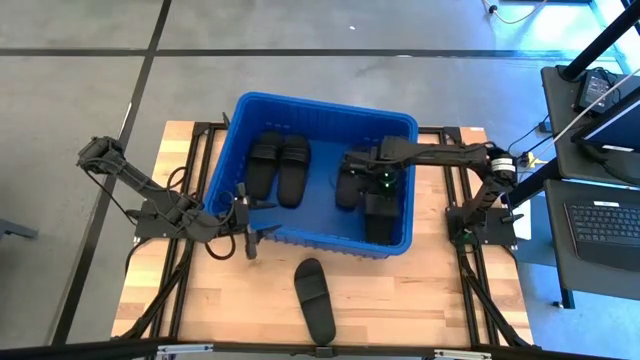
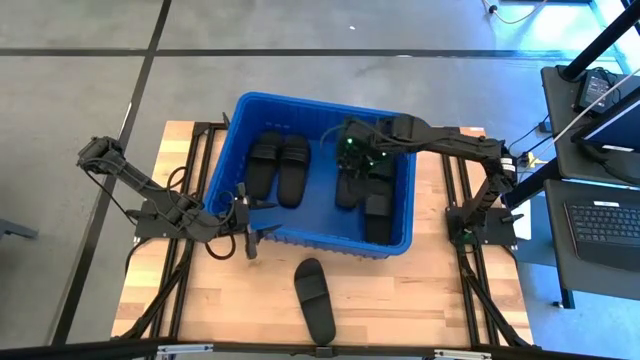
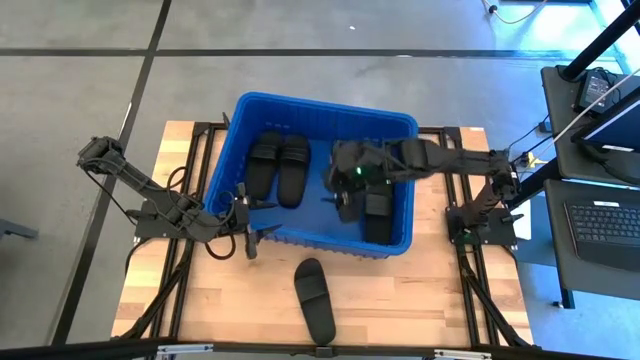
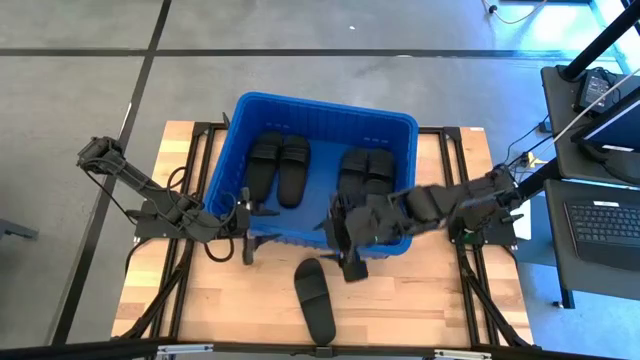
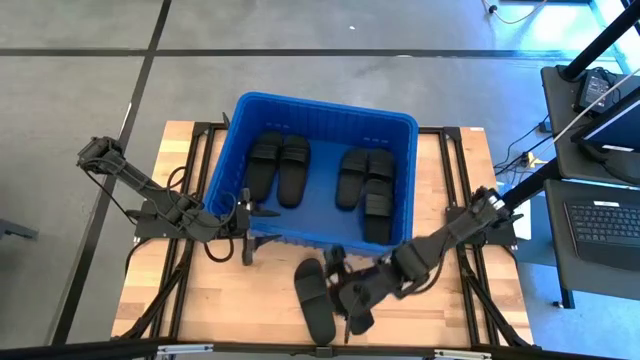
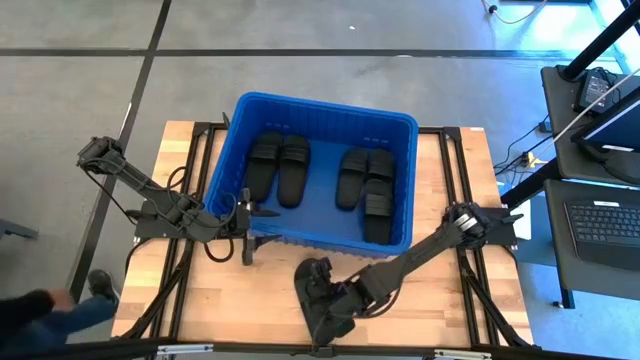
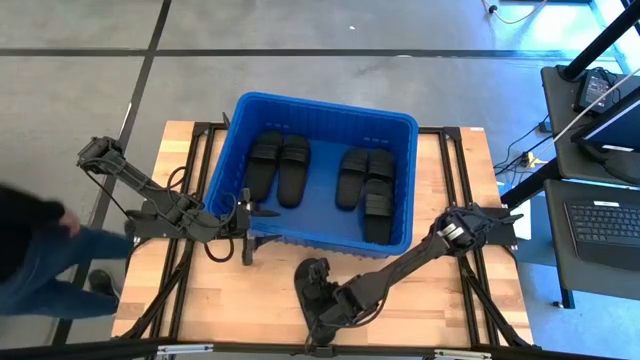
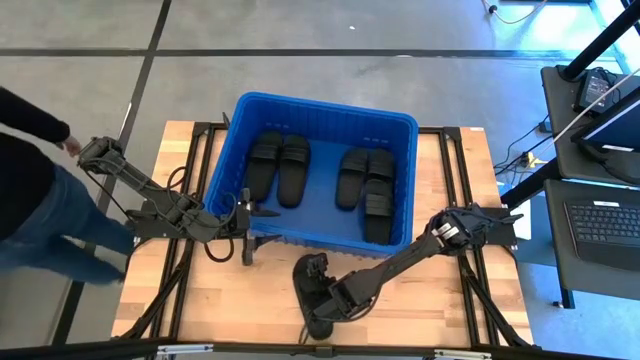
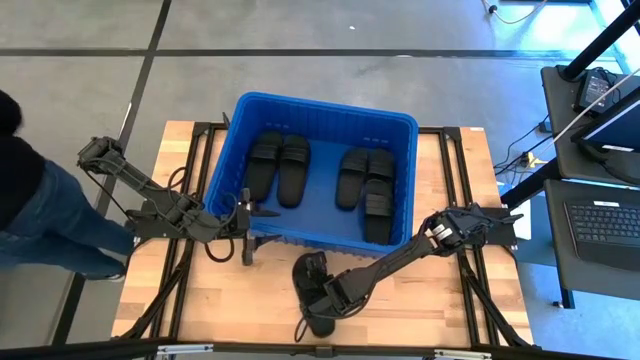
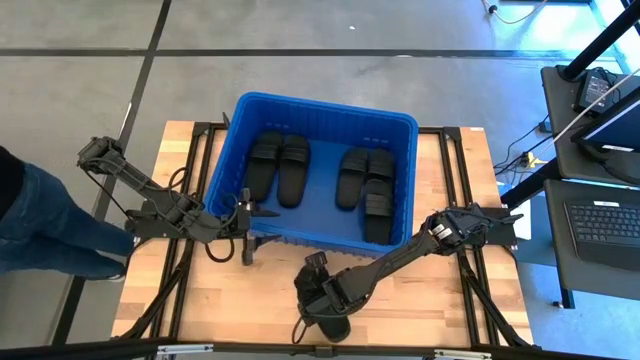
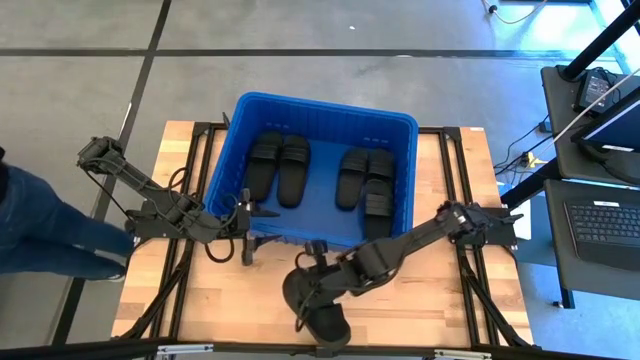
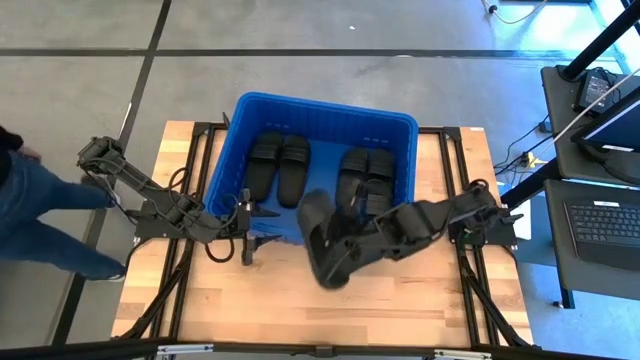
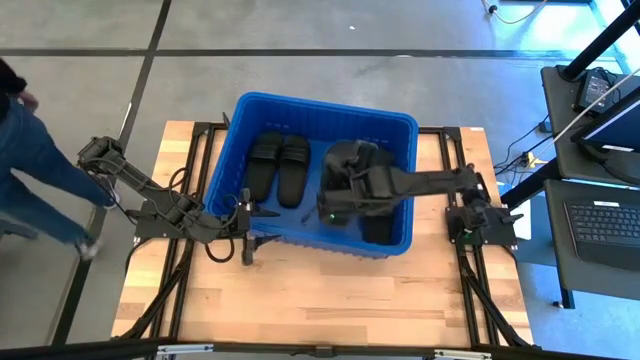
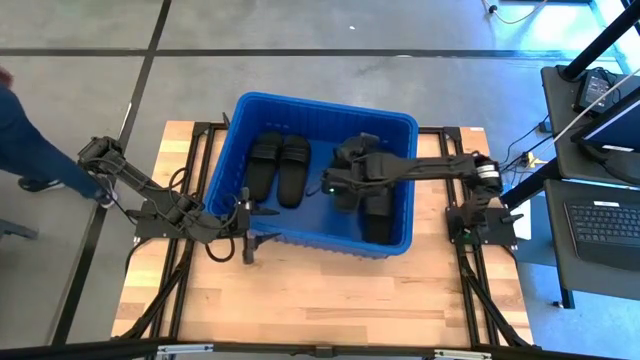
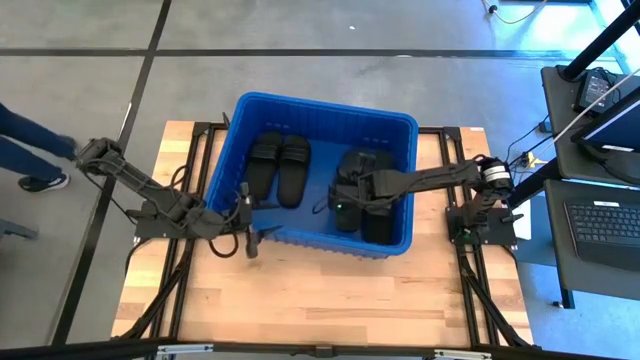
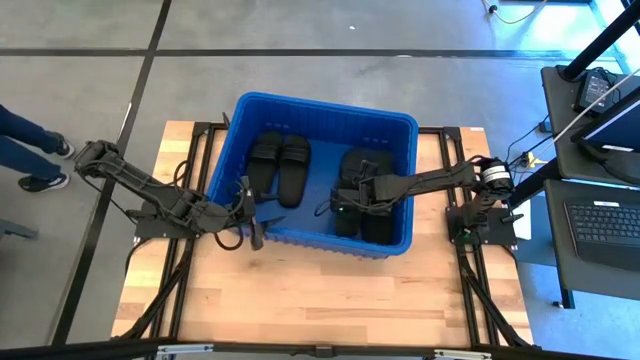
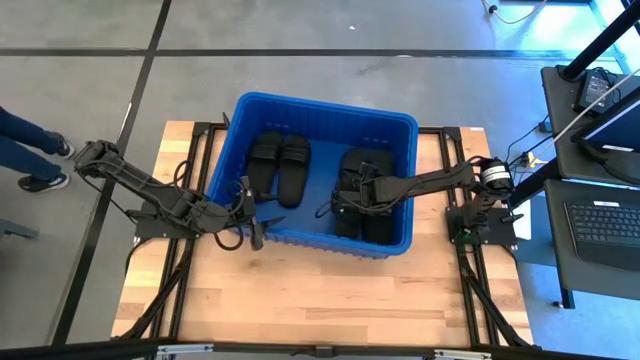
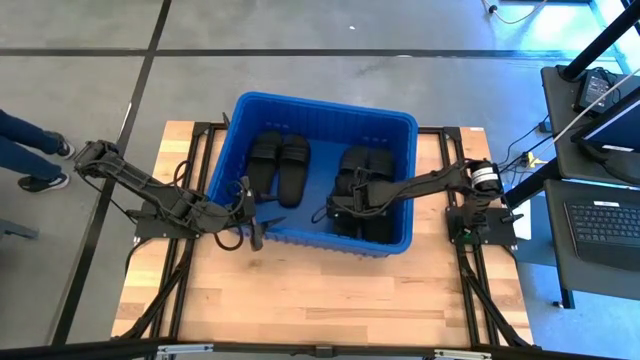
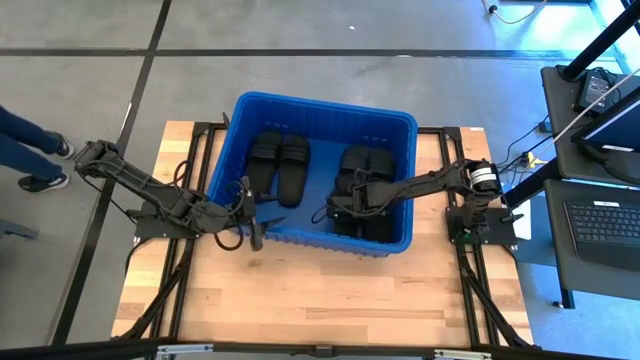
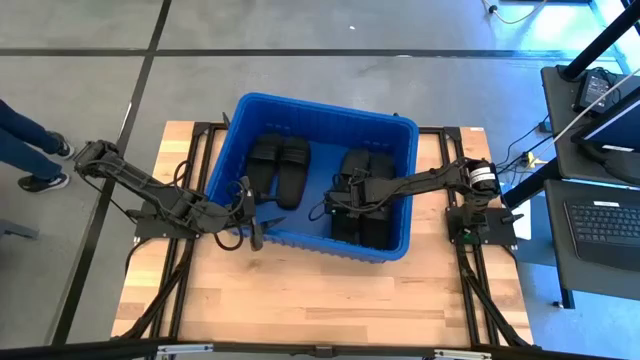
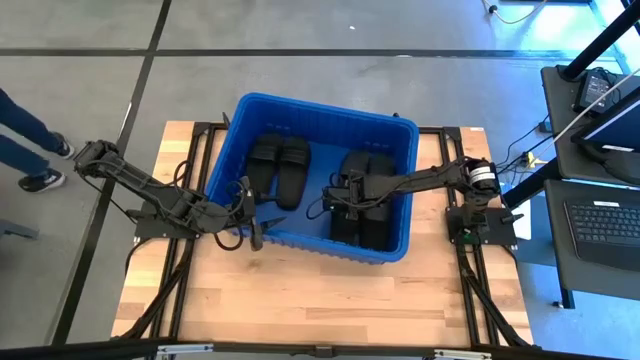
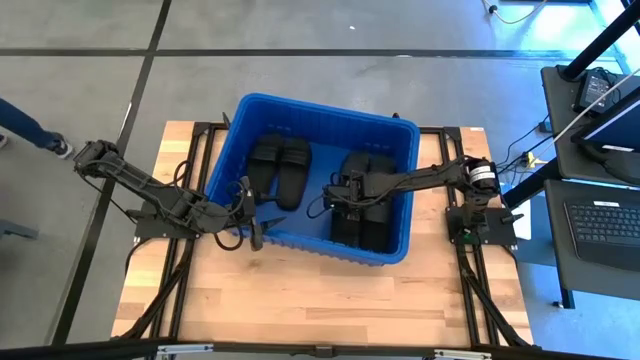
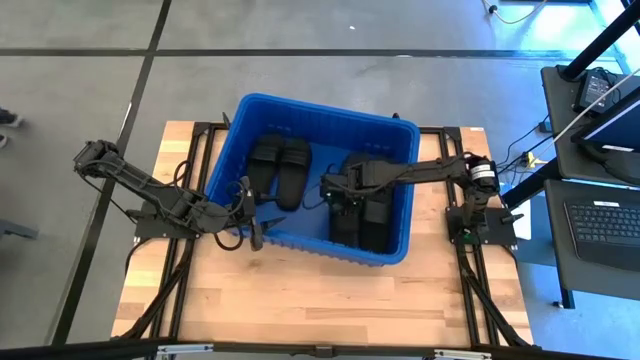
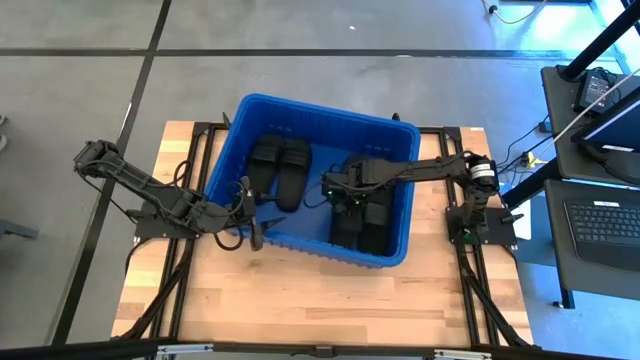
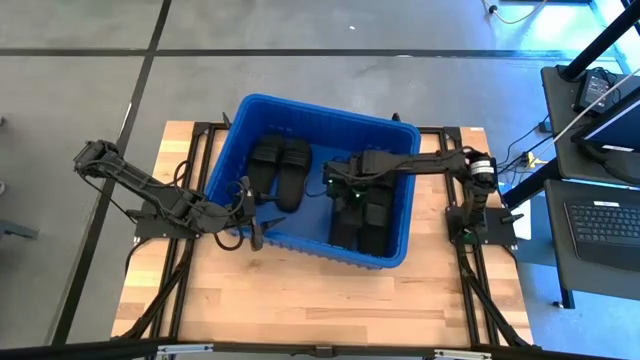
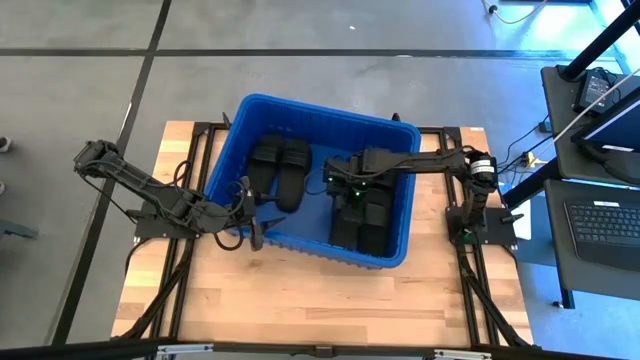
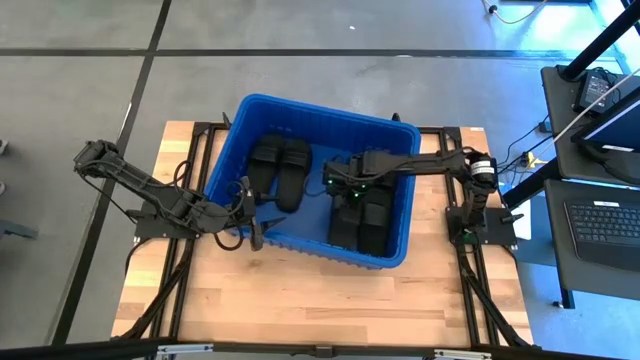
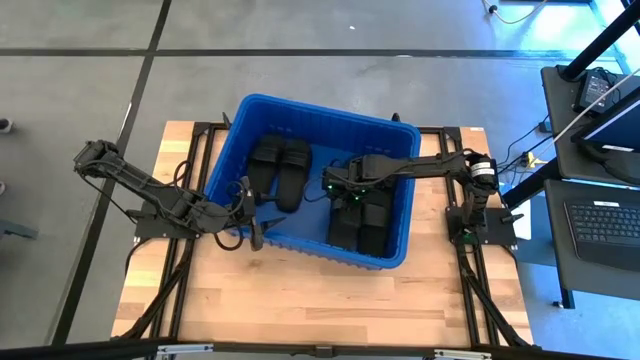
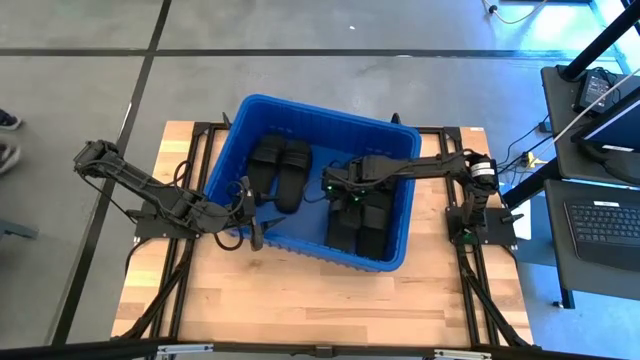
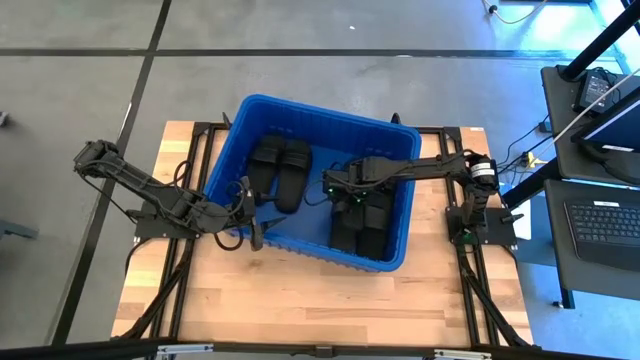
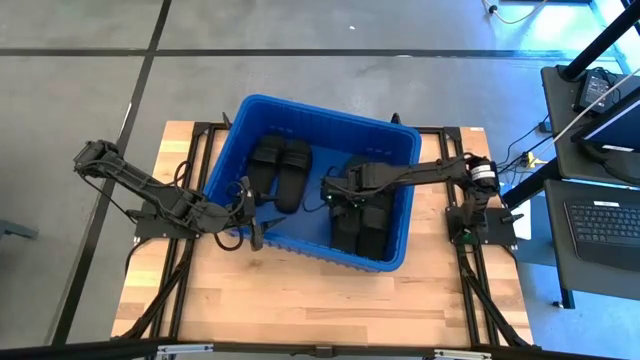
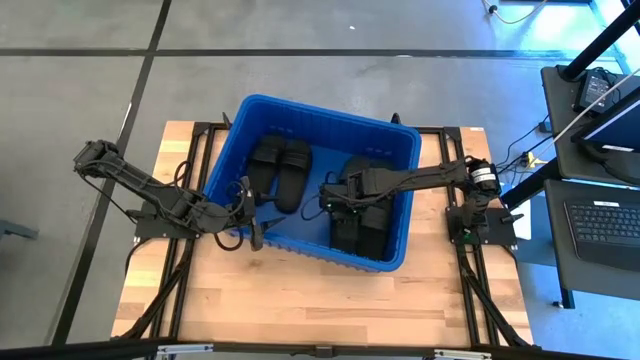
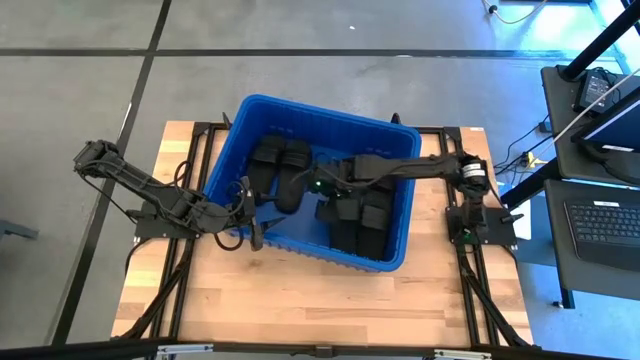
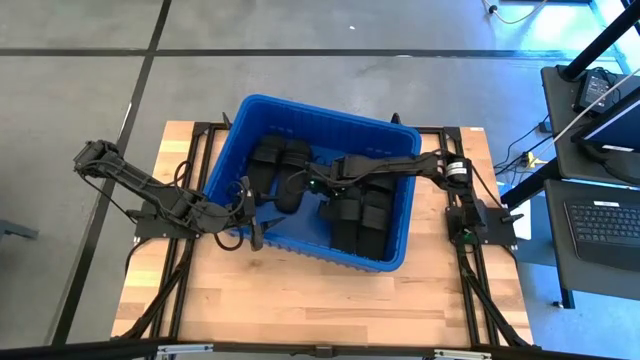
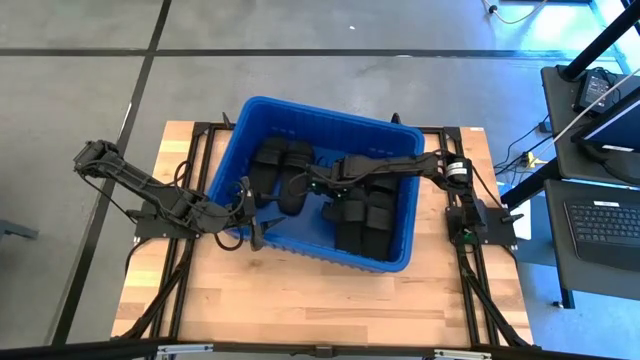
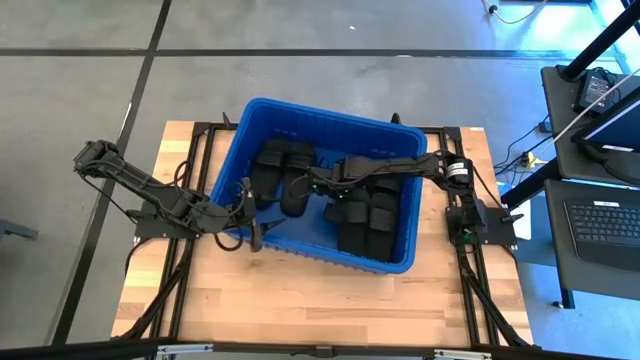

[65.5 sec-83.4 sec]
Task: Pick and place slides into bin
Put the black slide into the blue bin

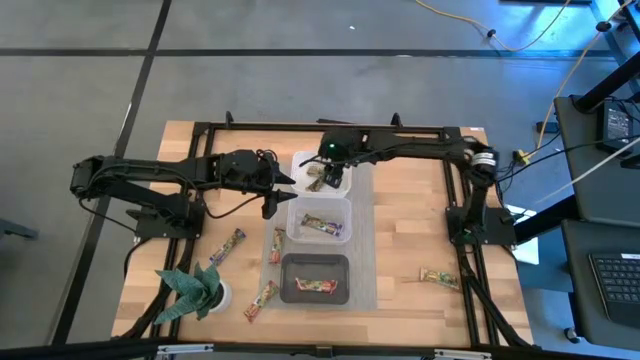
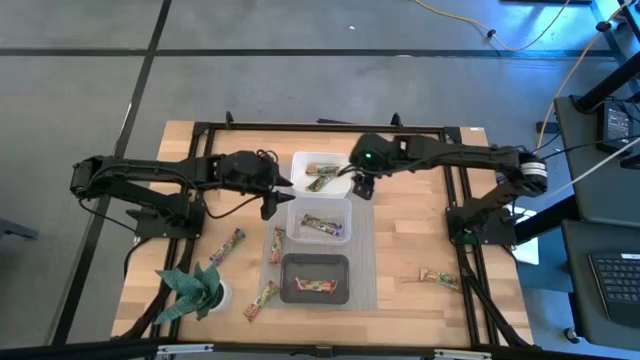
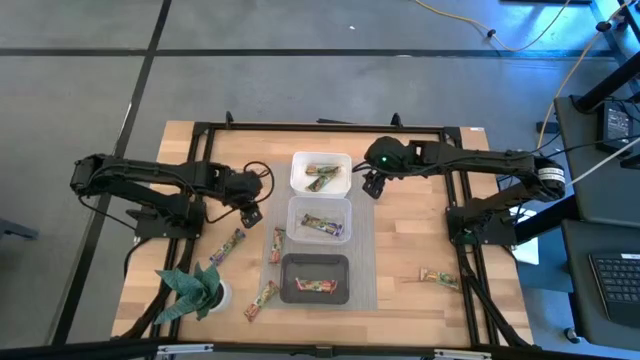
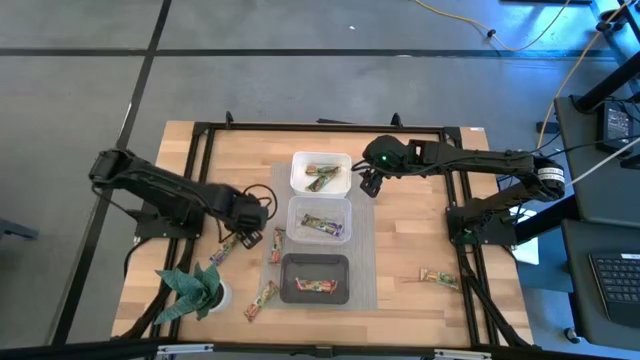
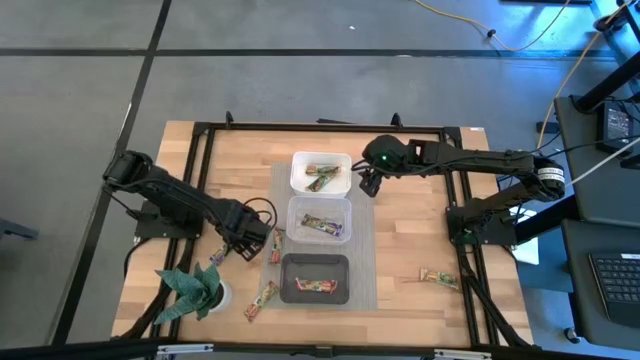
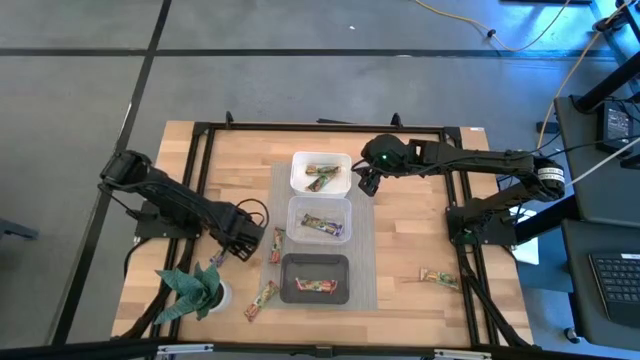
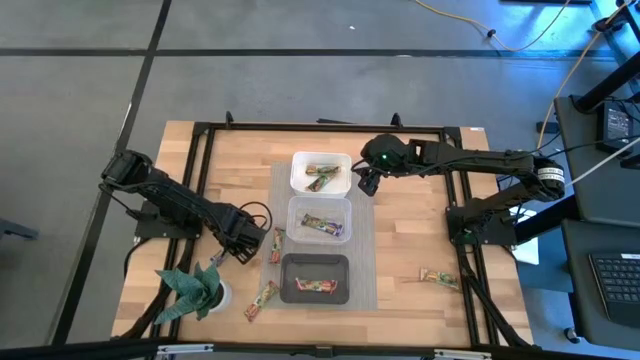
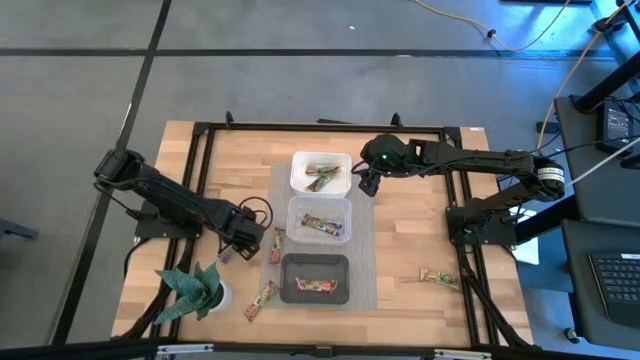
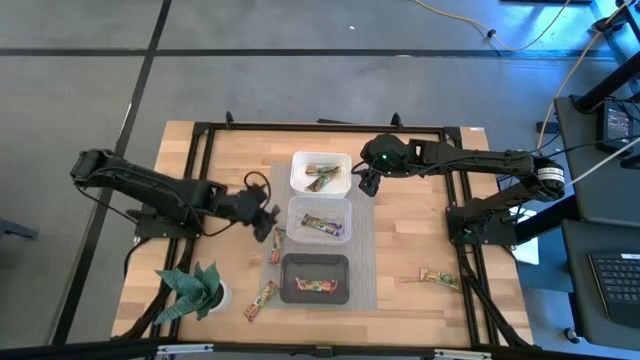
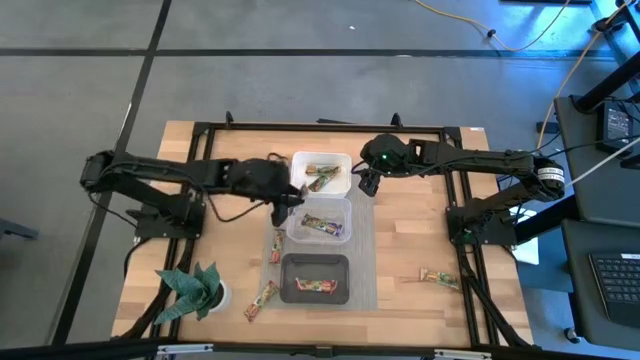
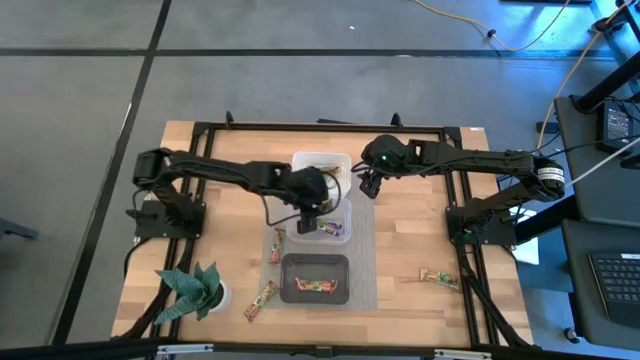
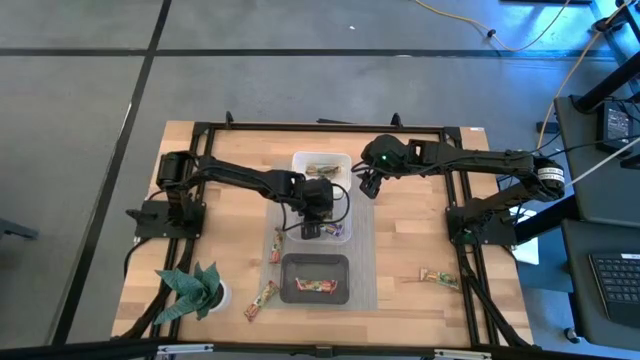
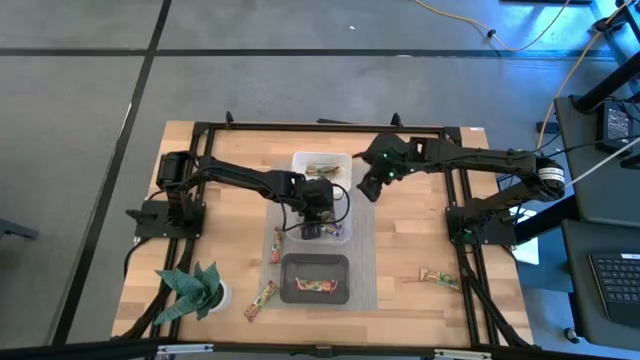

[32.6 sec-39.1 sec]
Task: Pick and place Granola Bars by type
Put the blue granola bar into the transparent bin
